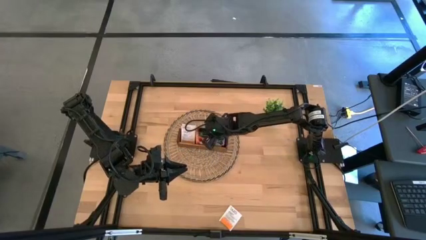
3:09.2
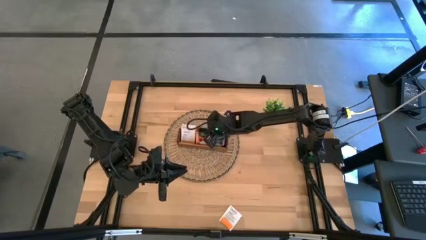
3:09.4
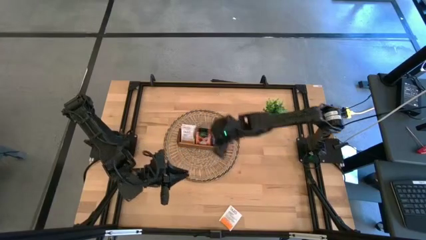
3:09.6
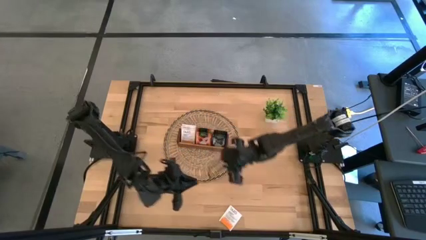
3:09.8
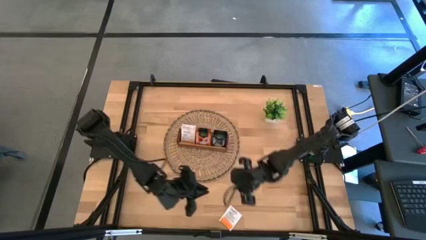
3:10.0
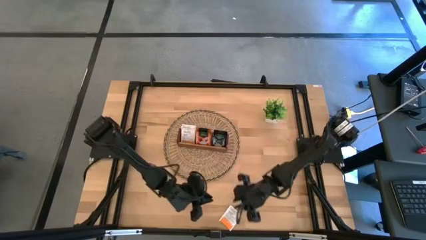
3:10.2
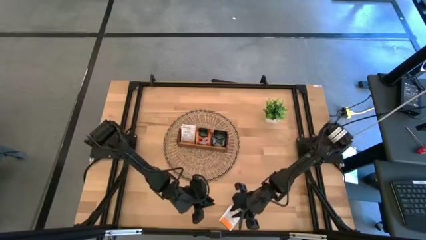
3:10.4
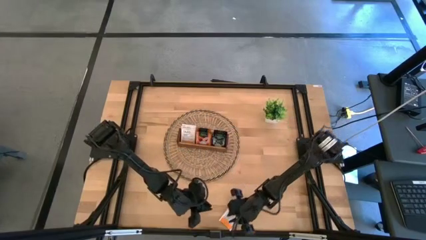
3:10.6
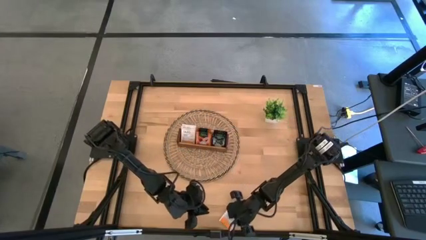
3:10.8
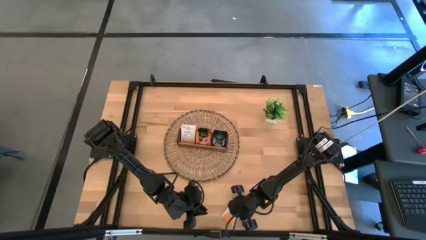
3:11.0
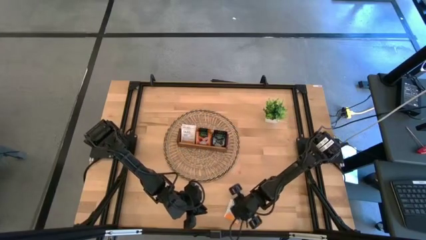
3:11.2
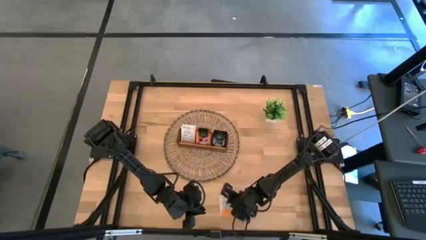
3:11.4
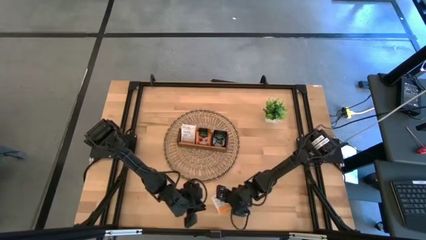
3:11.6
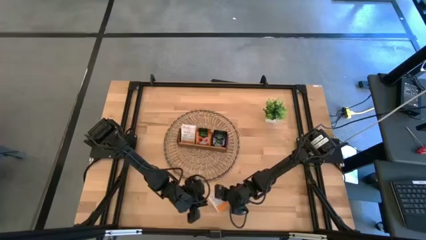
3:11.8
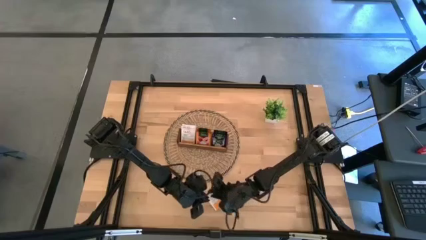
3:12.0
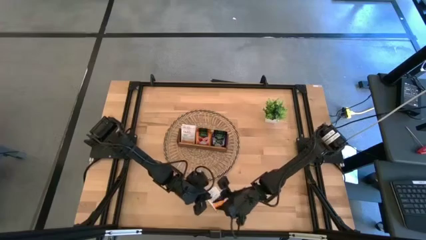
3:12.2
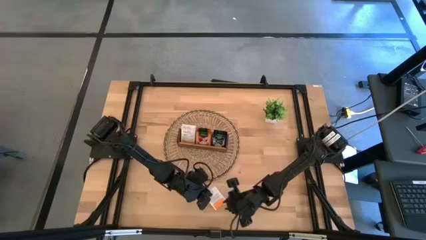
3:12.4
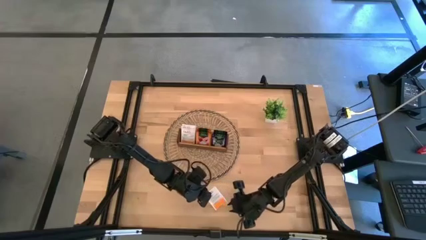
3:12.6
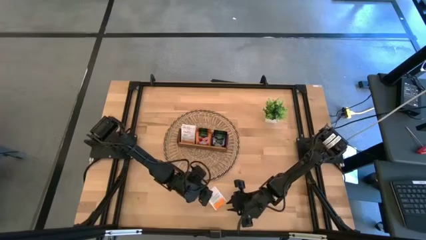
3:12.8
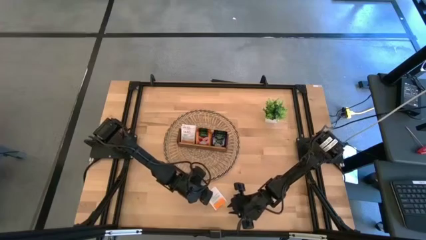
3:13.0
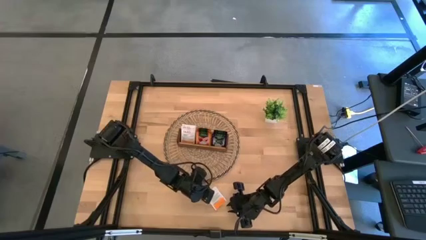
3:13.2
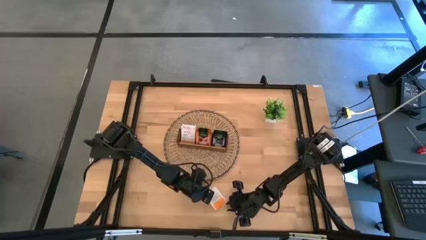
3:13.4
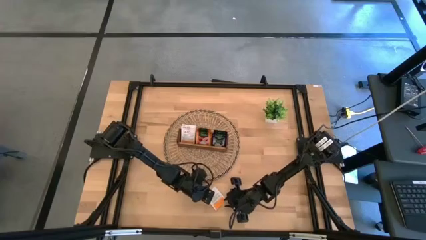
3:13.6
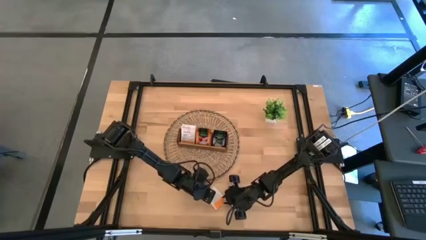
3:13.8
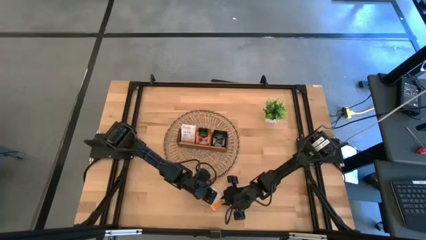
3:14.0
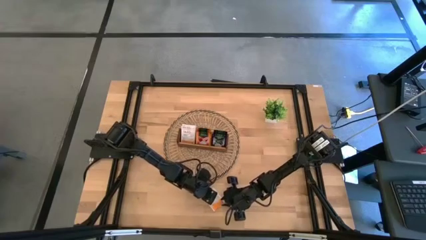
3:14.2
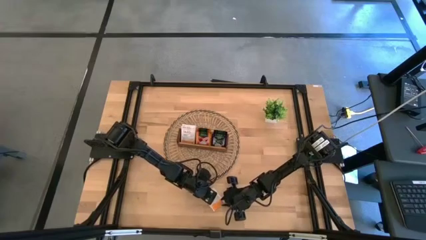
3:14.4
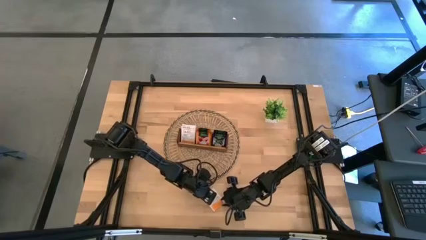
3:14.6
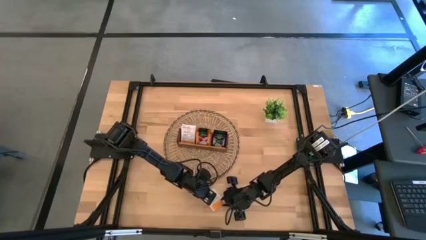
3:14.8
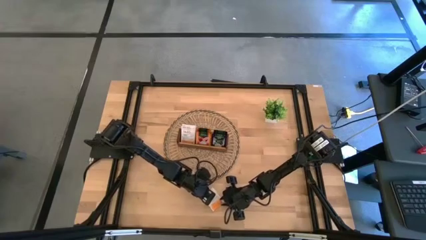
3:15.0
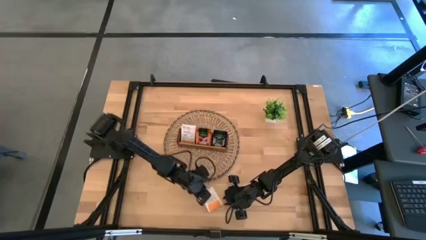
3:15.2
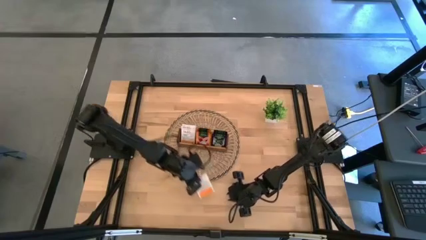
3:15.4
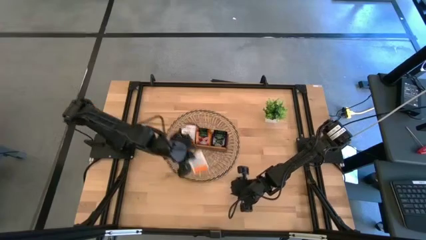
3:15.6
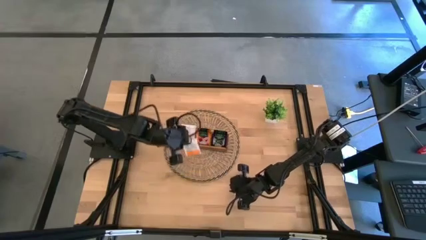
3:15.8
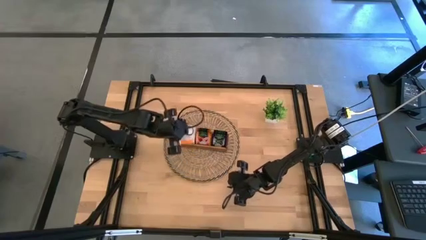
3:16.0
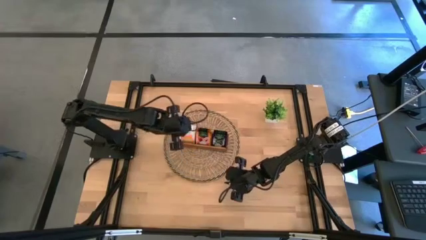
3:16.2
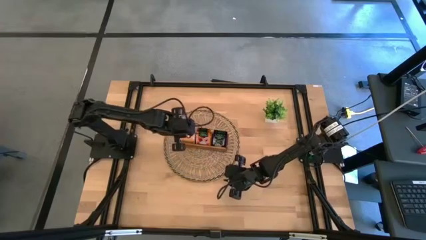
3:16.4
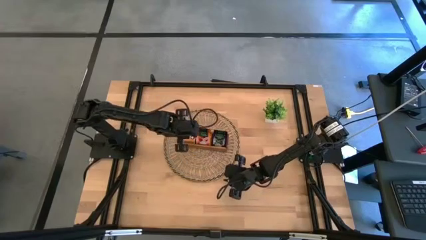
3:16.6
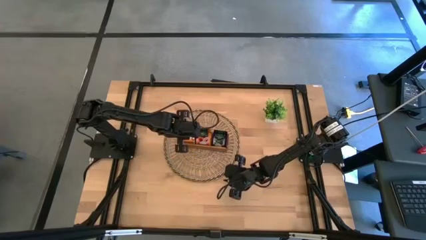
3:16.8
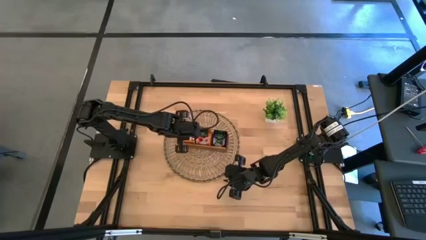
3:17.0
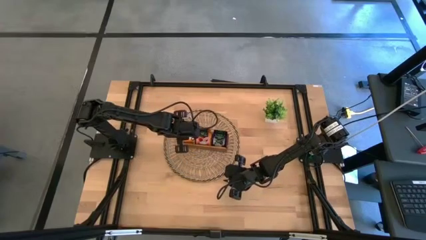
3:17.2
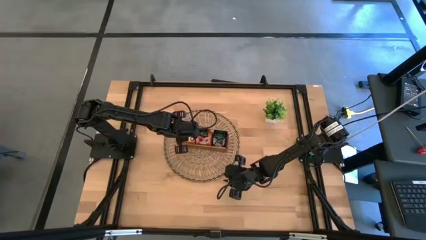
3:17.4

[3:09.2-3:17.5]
Task: Pick & Place Tea
Put the white tea bag into the left section of the wooden organizer

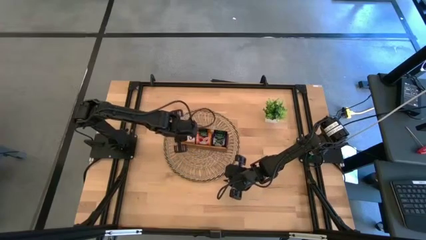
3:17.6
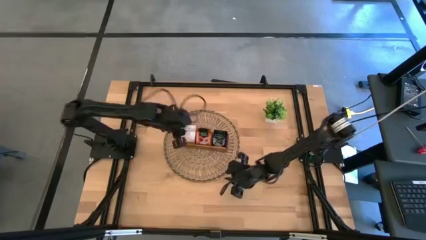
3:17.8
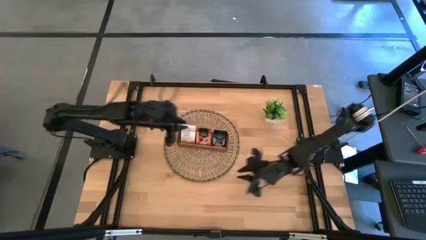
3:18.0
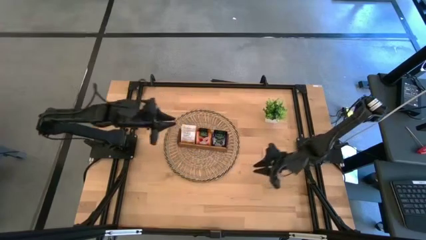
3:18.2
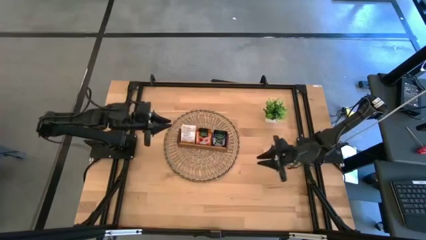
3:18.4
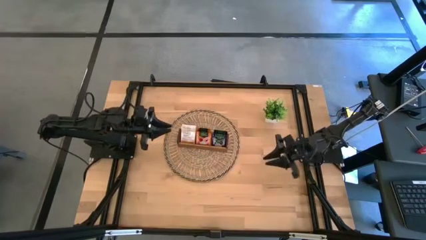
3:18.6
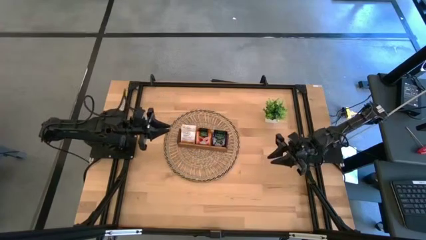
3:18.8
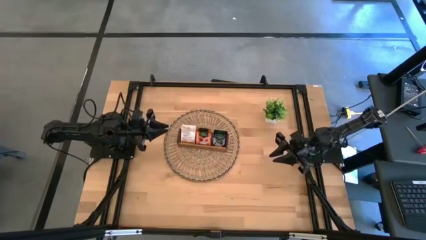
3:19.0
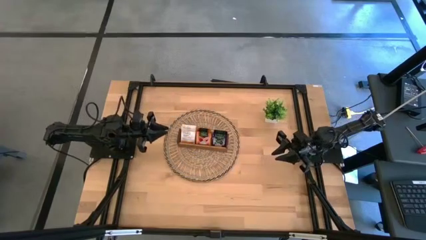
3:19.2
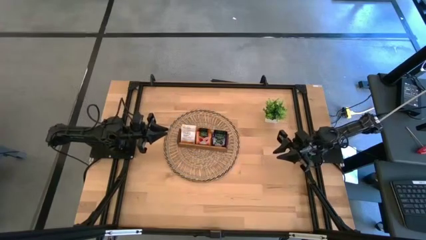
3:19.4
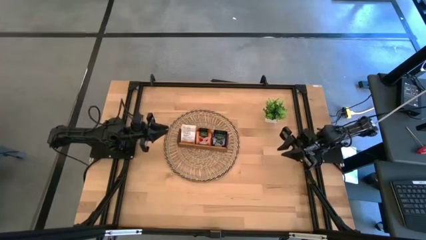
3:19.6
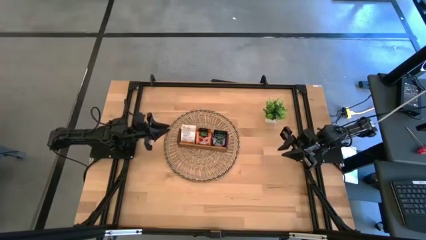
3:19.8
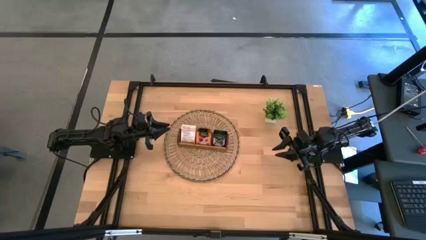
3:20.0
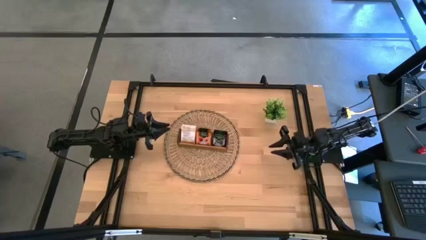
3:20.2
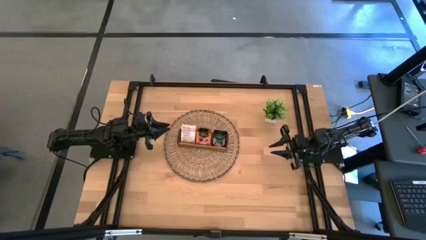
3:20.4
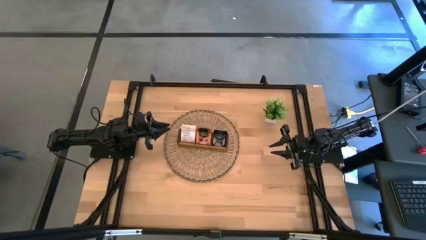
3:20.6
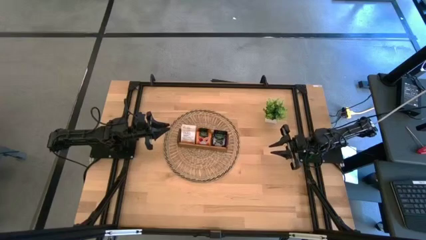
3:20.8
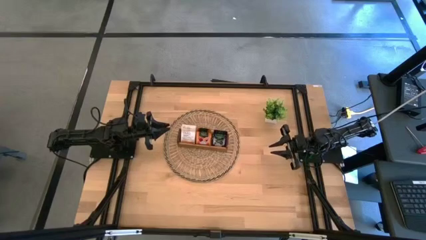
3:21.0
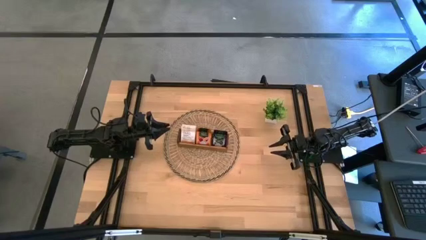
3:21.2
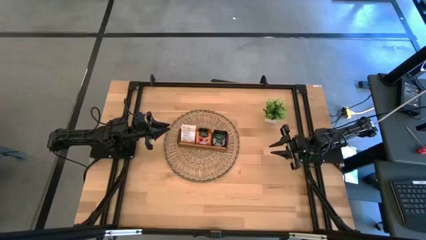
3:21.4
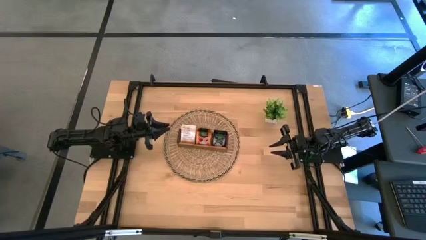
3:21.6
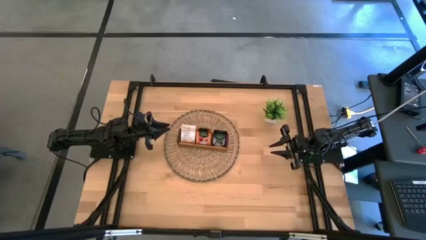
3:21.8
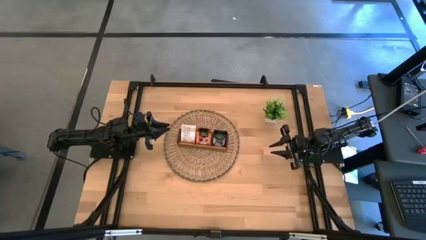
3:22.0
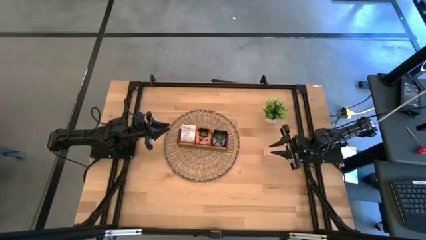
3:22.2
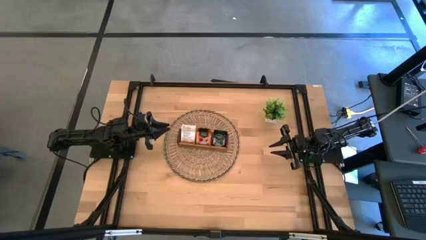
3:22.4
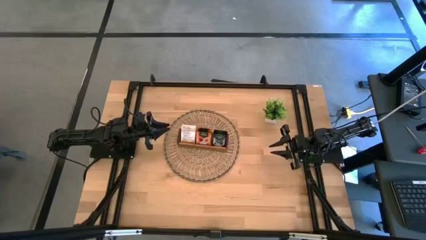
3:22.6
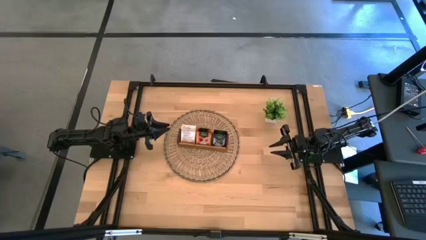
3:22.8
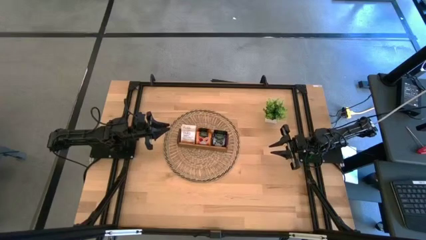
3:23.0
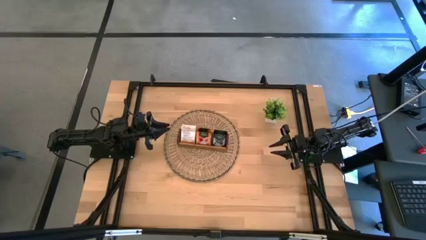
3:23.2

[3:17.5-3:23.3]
Return to Home Position
